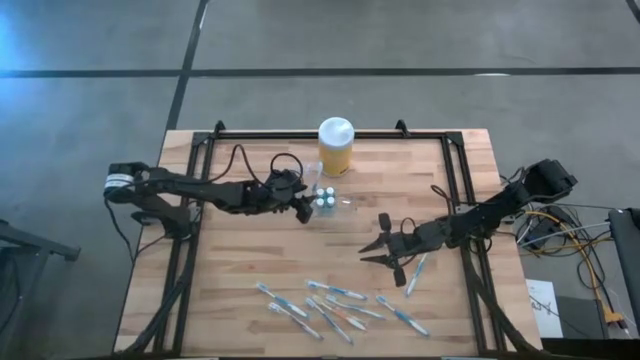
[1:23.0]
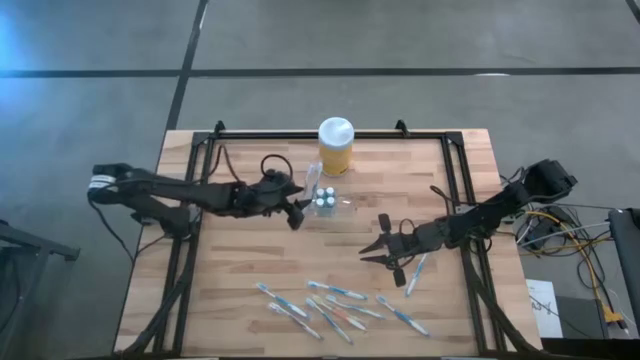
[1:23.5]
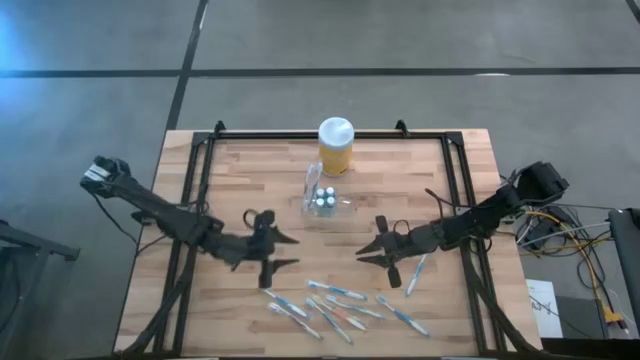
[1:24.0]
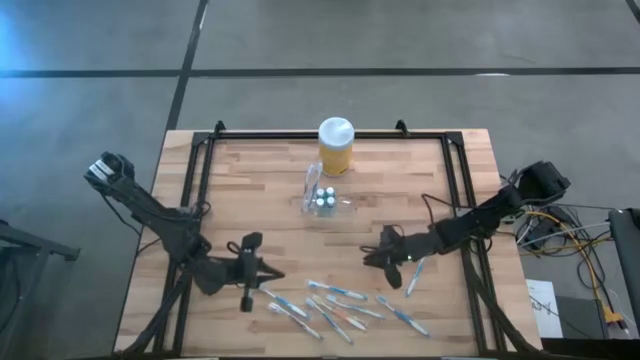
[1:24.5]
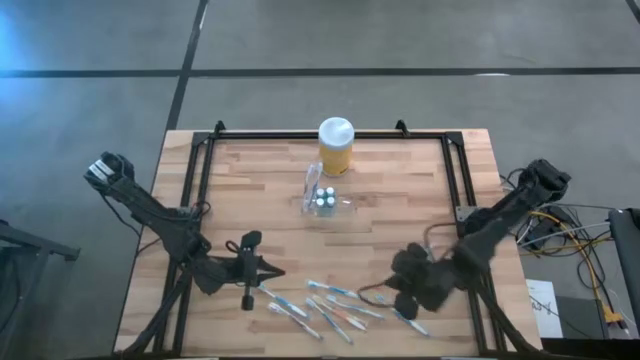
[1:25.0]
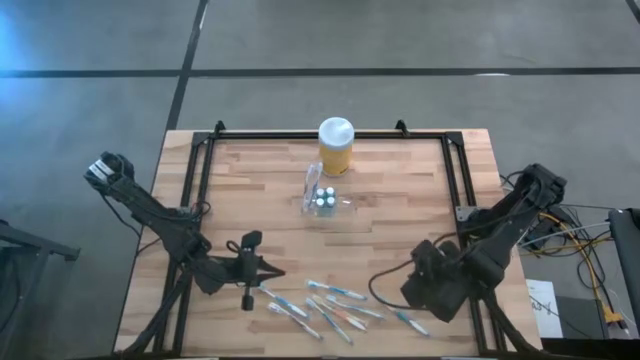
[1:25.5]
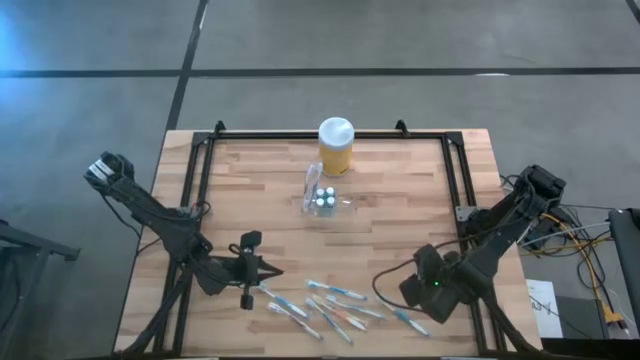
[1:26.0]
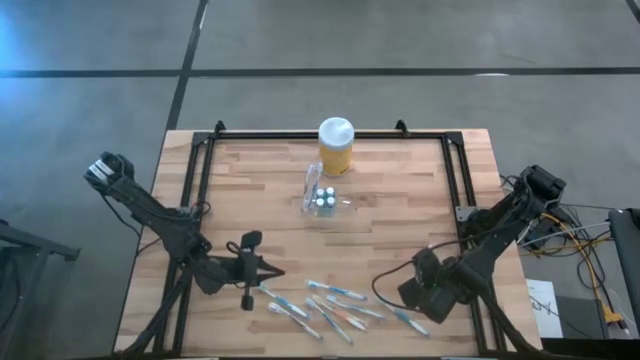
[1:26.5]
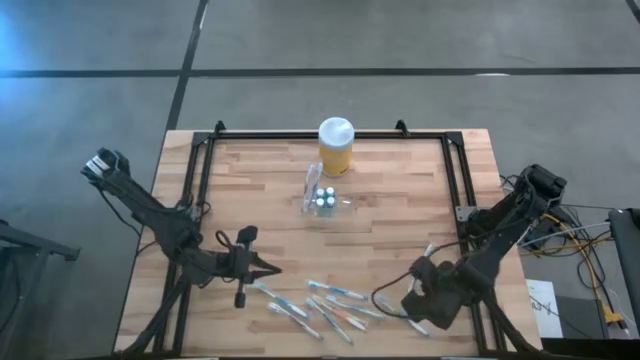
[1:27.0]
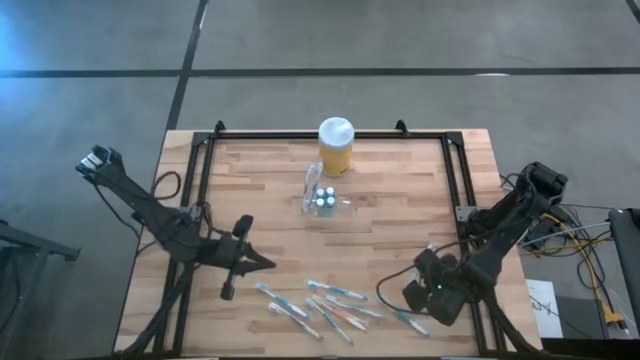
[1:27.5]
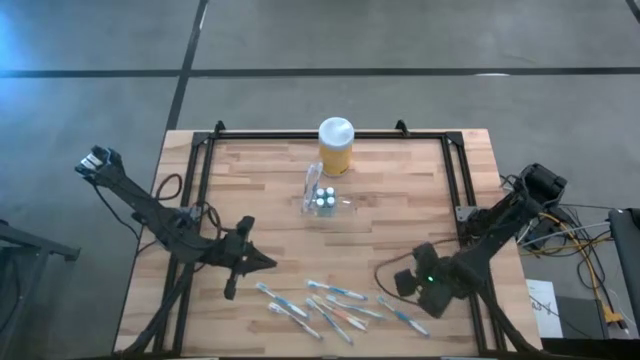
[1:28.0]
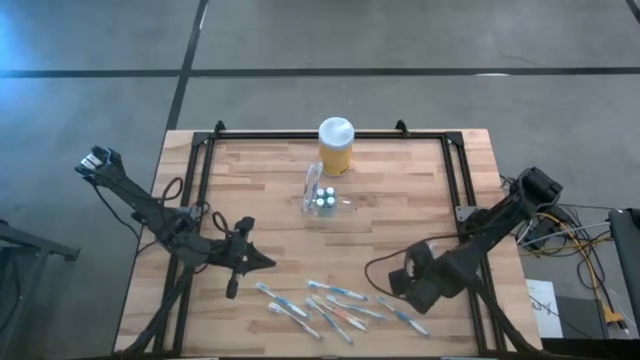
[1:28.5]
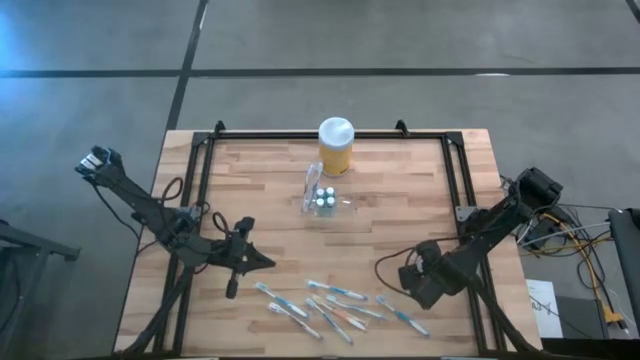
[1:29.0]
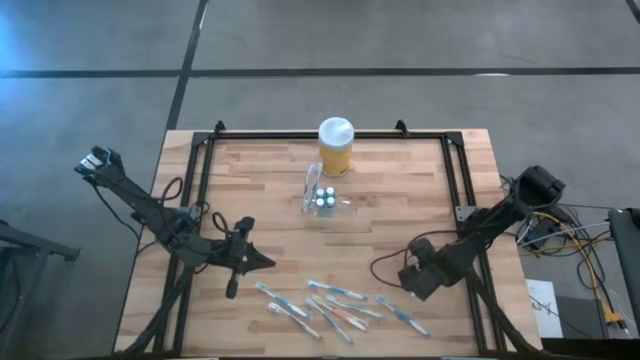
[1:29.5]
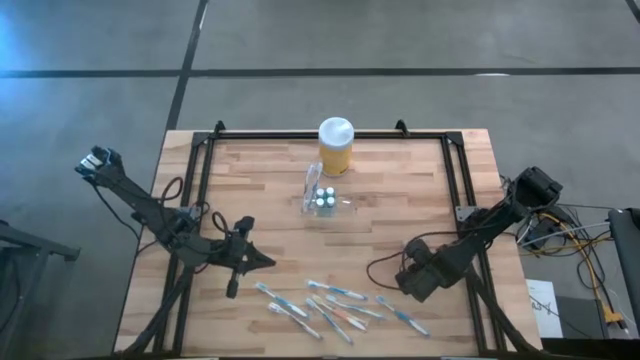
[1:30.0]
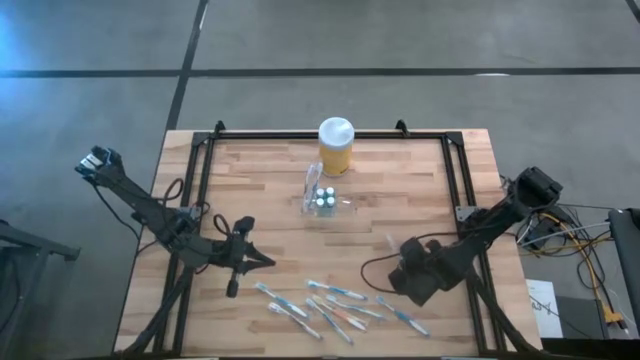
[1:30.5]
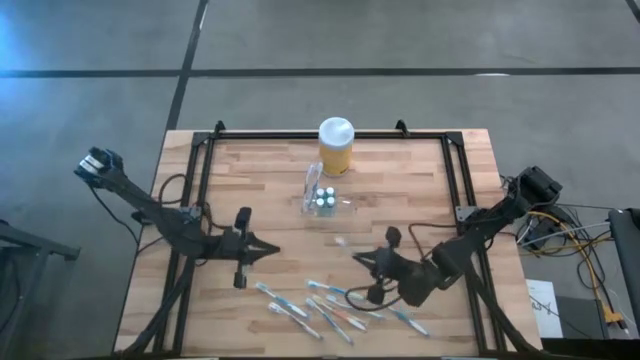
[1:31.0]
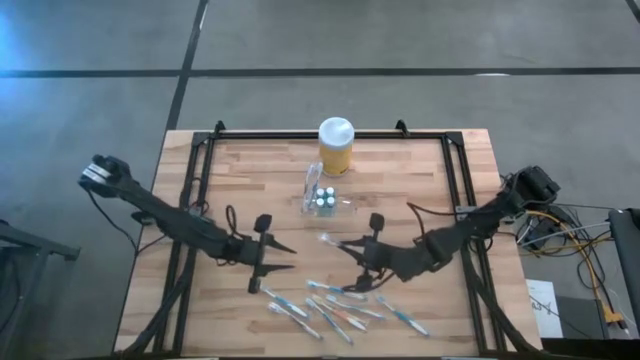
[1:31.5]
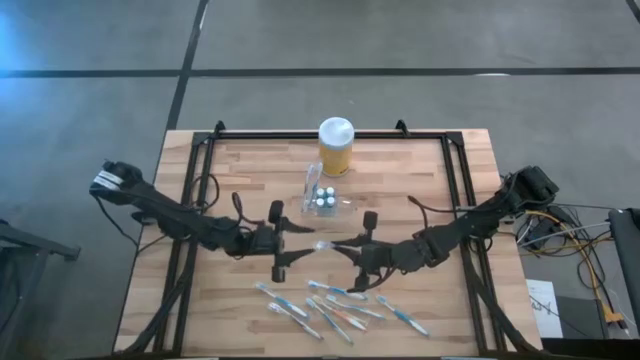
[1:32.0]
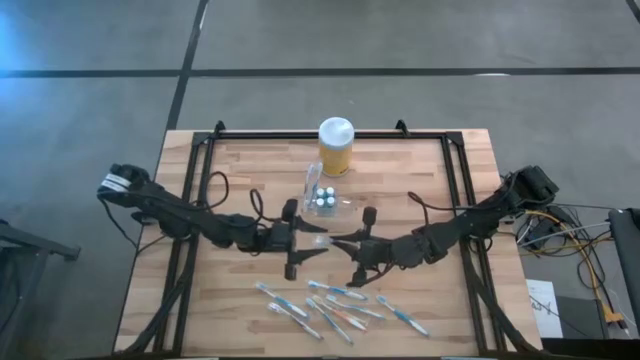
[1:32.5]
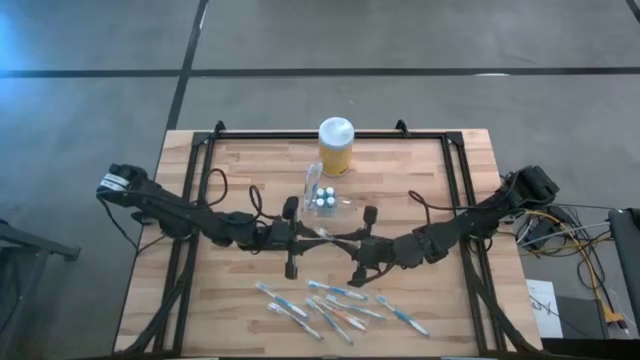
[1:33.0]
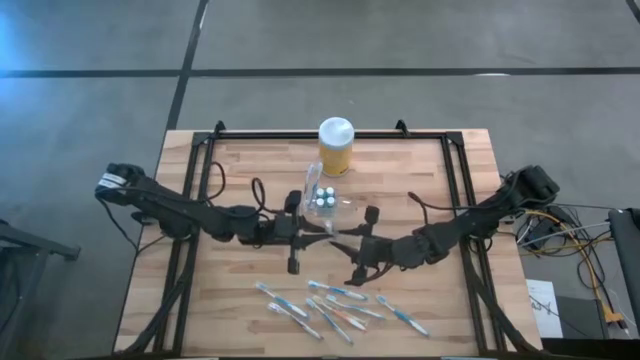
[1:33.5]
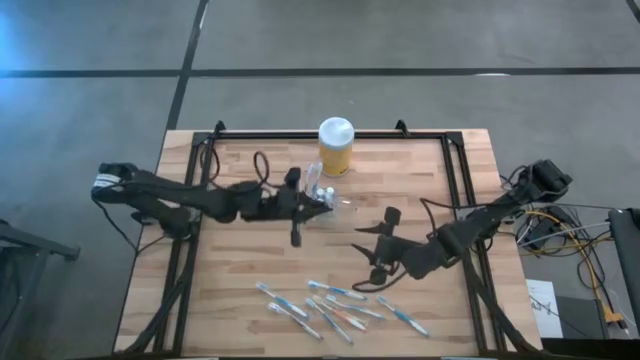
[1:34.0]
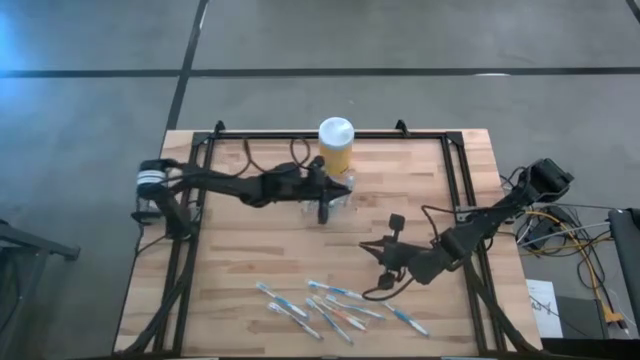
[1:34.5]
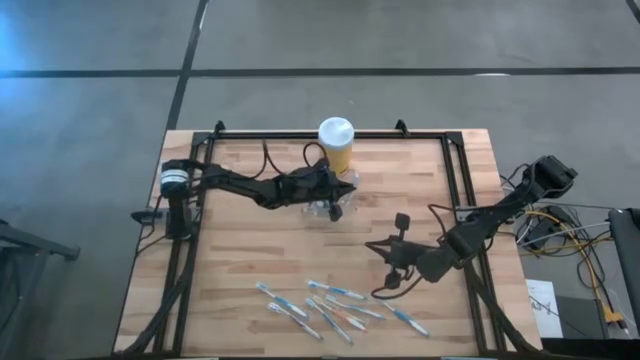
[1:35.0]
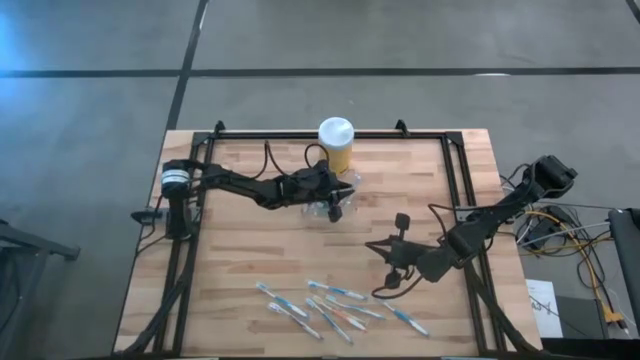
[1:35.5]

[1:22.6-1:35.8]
Task: Pick & Place toothbrushing station
Put the blue toothbrush into the transparent organizer

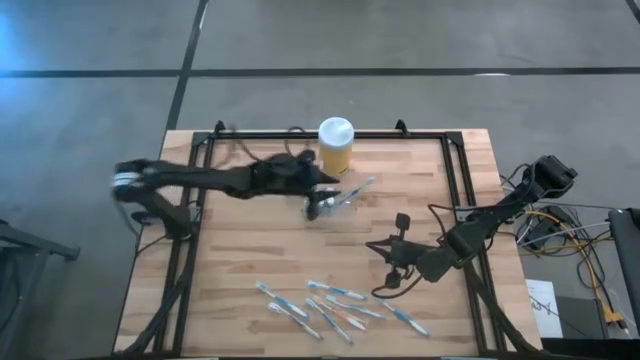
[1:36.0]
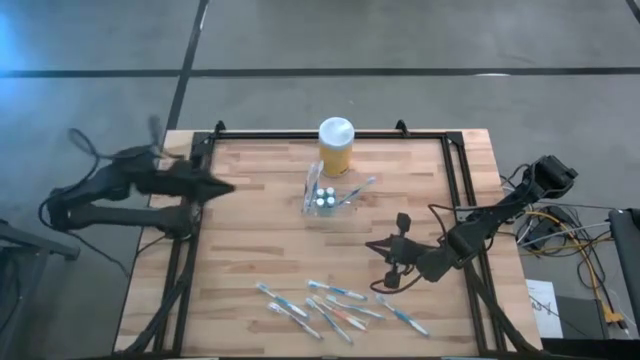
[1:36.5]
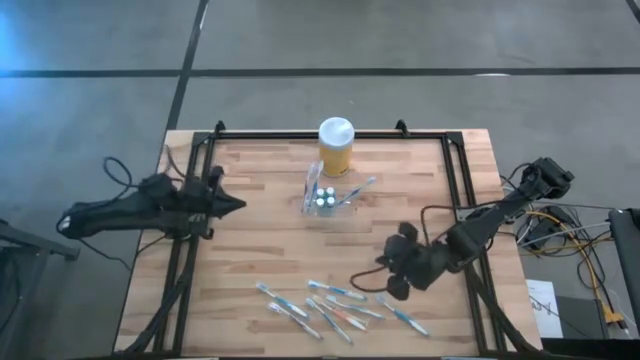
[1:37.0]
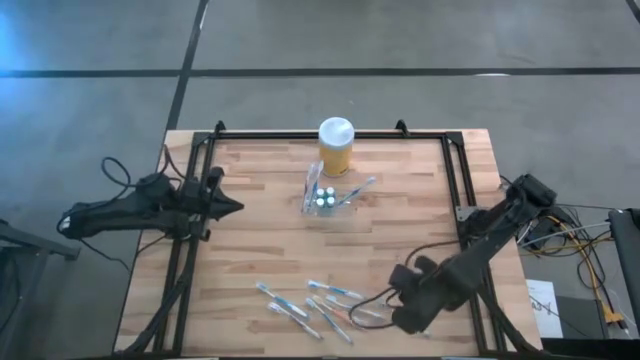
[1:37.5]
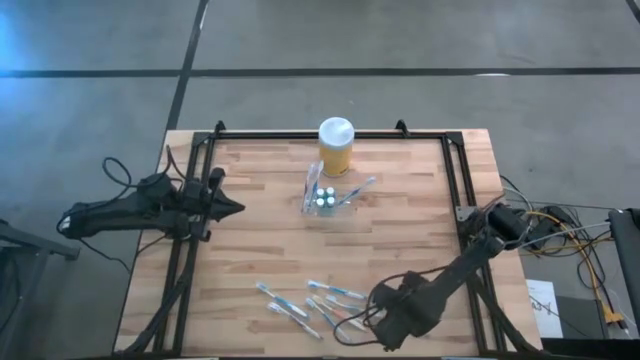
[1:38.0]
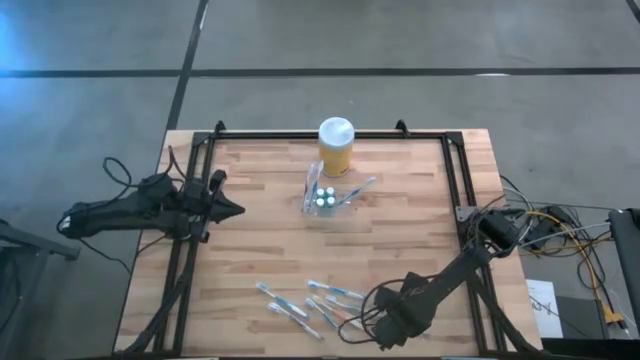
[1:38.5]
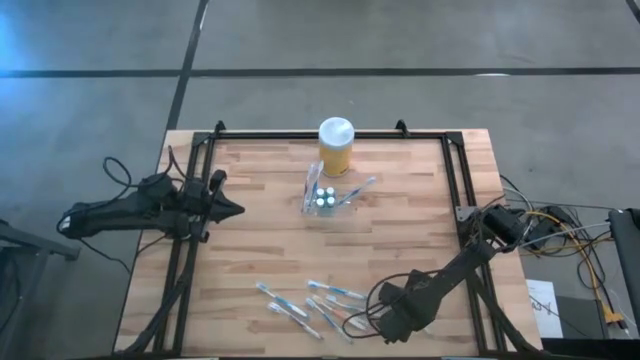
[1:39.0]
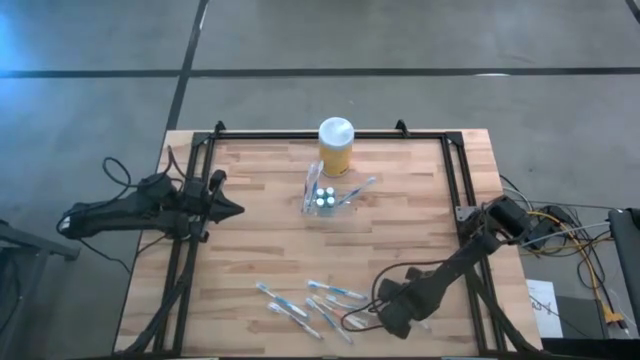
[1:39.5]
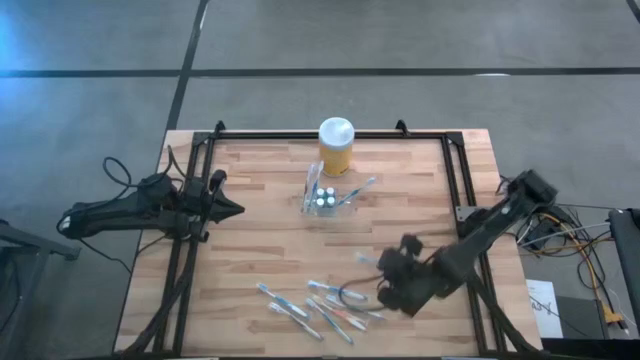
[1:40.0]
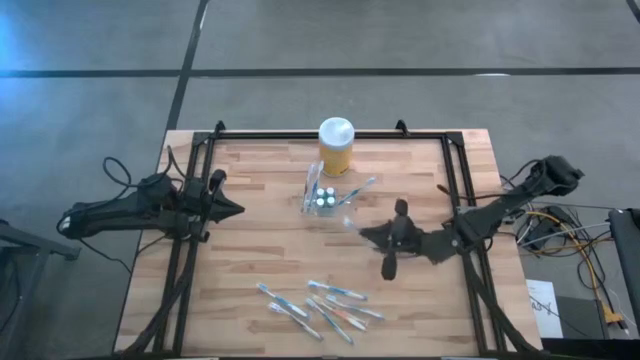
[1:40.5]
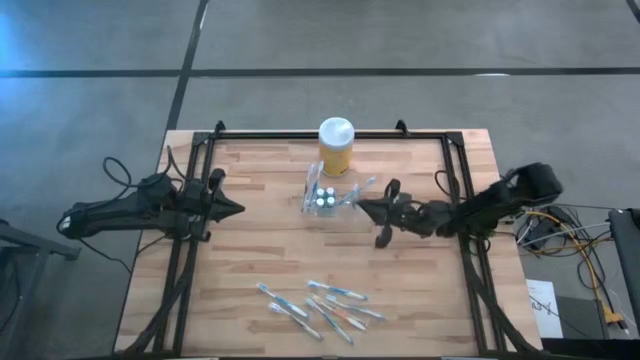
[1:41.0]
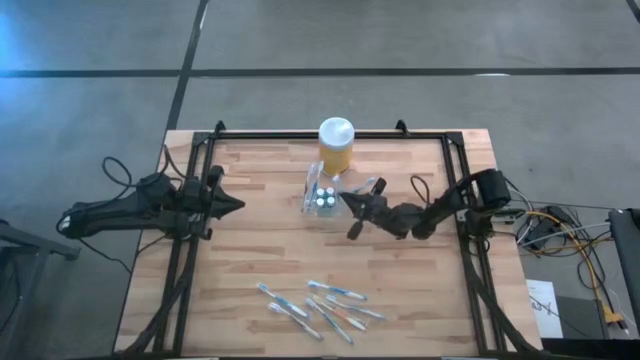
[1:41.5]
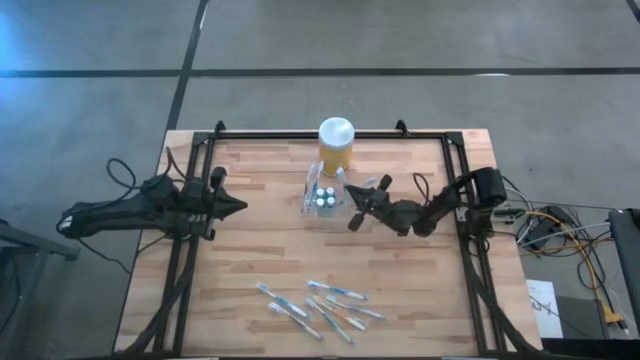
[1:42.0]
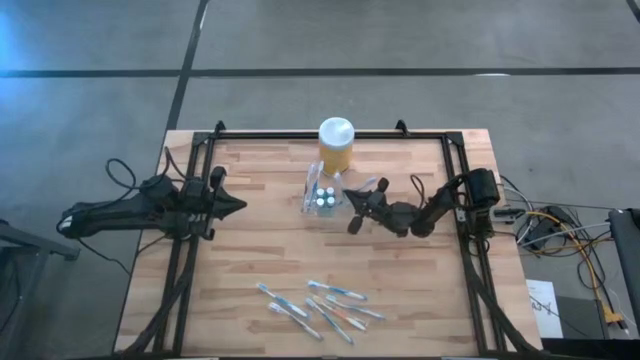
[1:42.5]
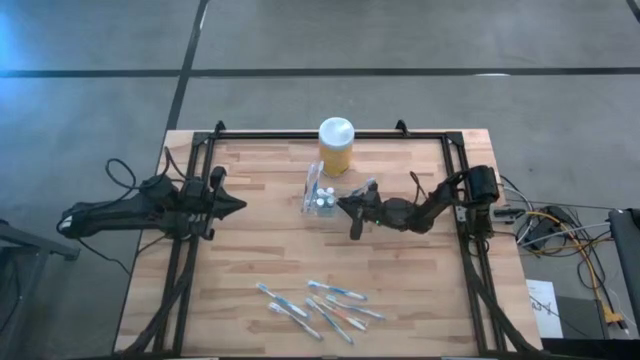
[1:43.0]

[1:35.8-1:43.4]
Put the blue toothbrush into the transparent organizer

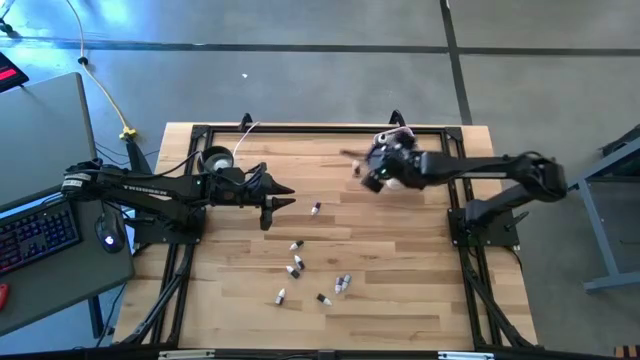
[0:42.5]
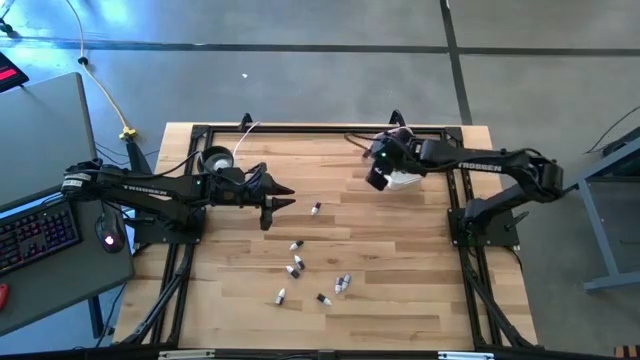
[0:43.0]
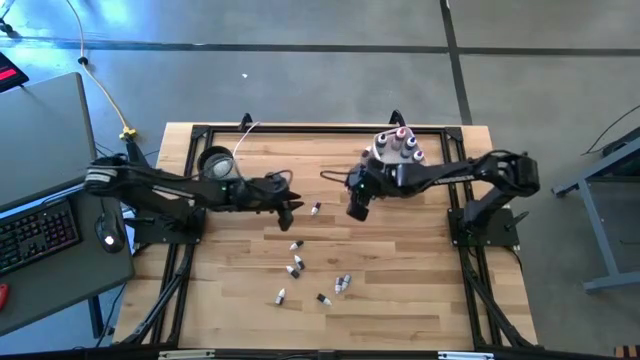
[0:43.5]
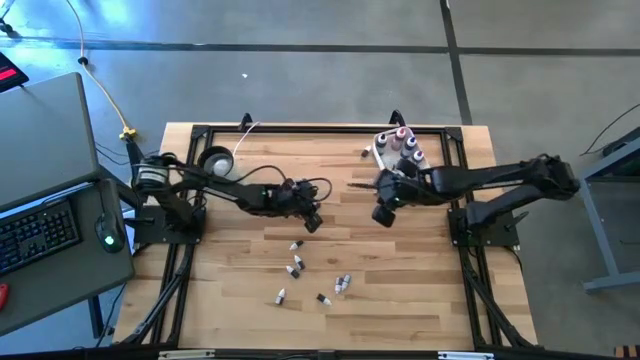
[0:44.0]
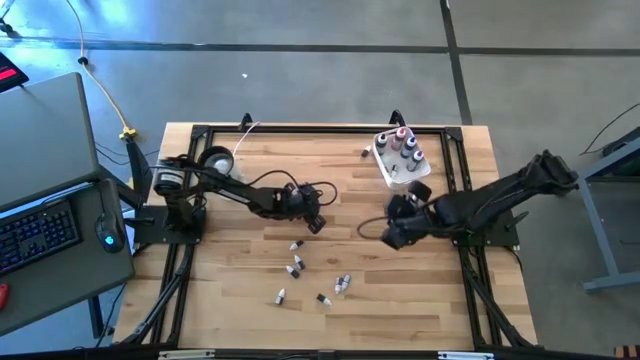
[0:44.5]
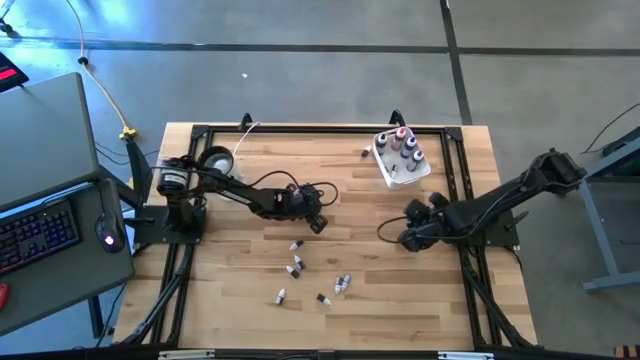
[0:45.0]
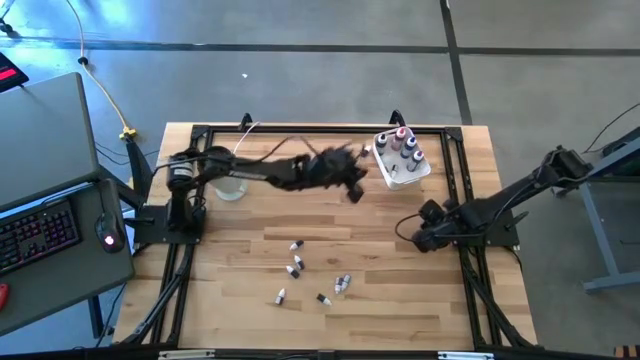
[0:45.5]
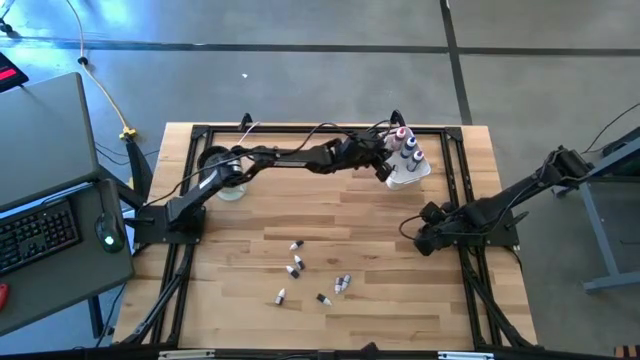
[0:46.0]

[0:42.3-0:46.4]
Task: Pick & Place food coloring
Put the bottom small red food coloring bottle into the white bin
